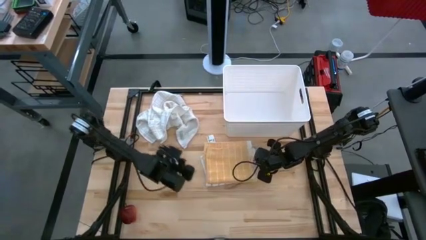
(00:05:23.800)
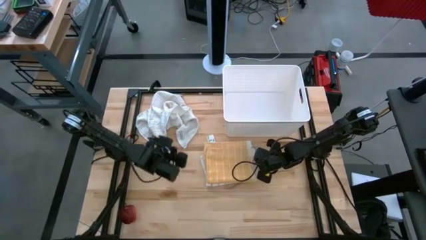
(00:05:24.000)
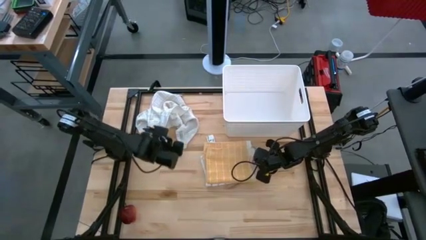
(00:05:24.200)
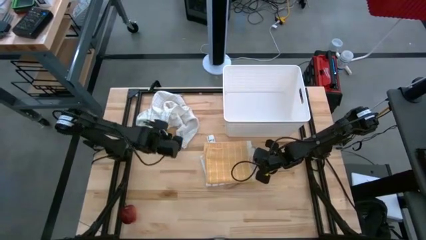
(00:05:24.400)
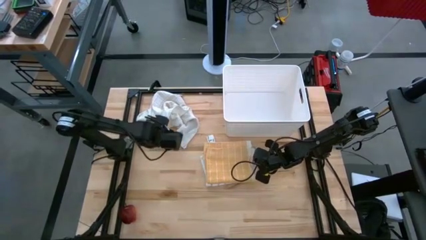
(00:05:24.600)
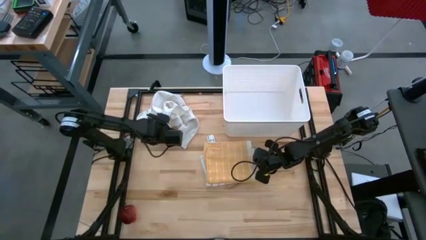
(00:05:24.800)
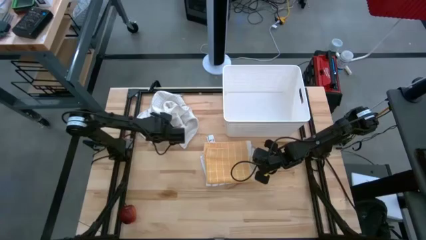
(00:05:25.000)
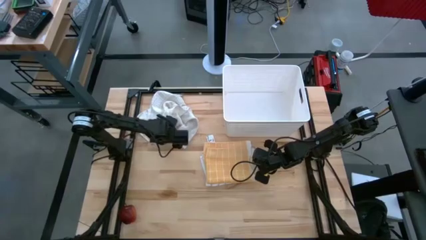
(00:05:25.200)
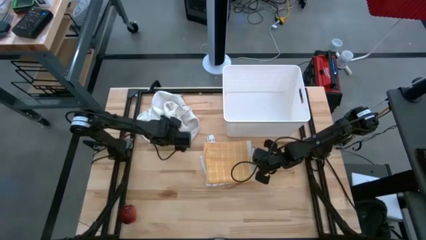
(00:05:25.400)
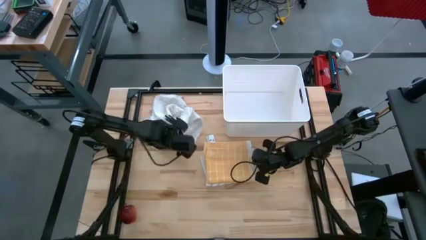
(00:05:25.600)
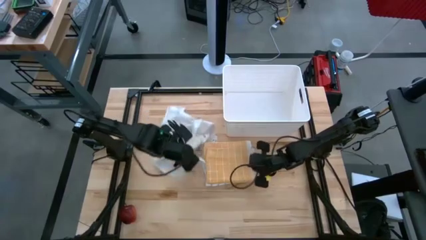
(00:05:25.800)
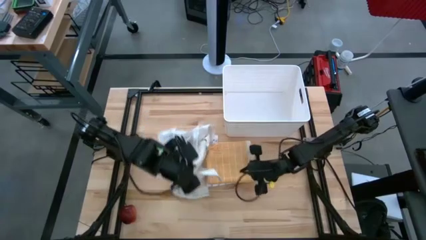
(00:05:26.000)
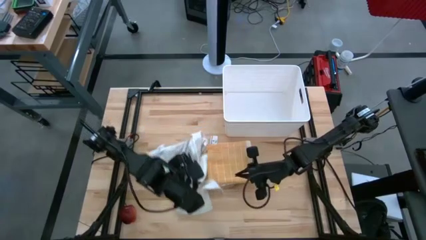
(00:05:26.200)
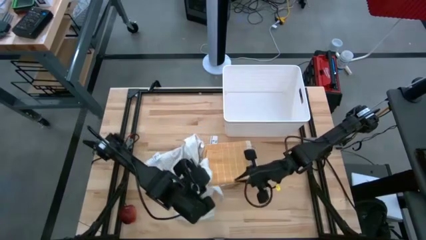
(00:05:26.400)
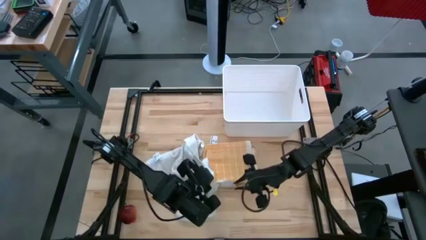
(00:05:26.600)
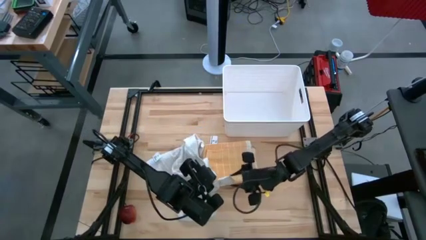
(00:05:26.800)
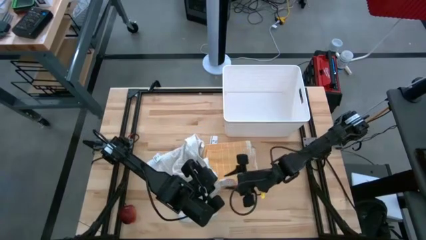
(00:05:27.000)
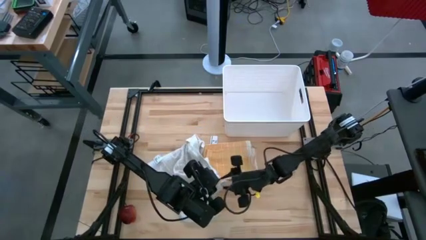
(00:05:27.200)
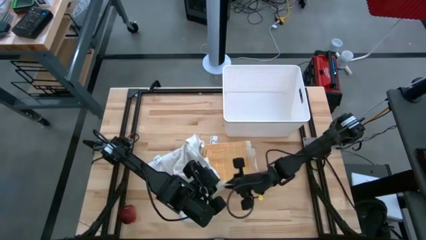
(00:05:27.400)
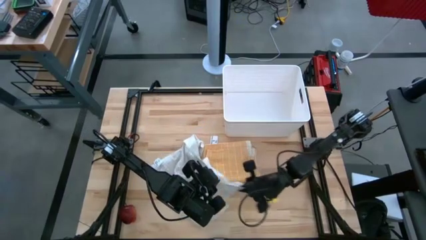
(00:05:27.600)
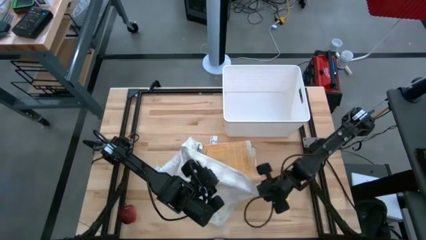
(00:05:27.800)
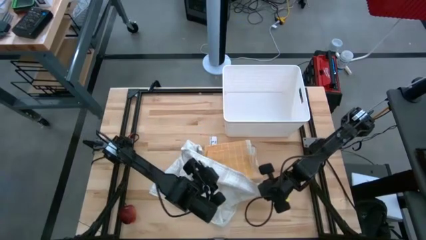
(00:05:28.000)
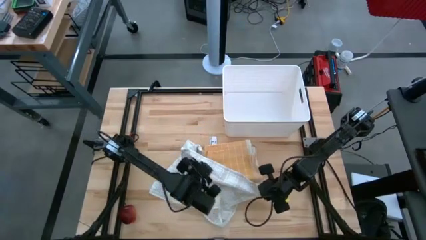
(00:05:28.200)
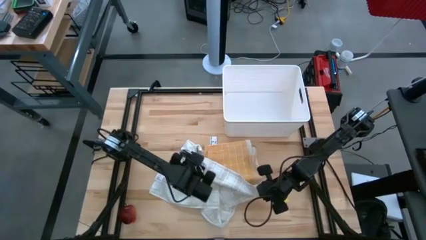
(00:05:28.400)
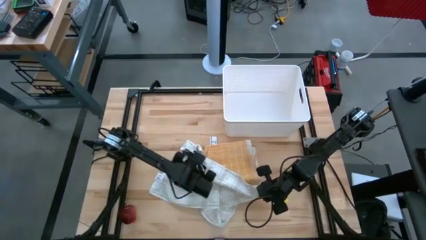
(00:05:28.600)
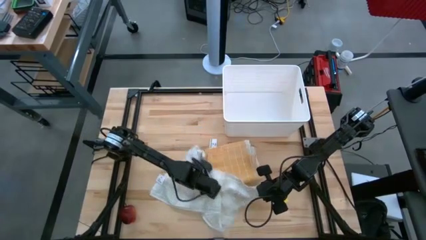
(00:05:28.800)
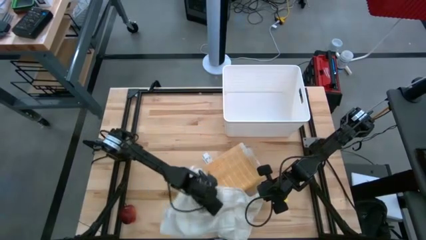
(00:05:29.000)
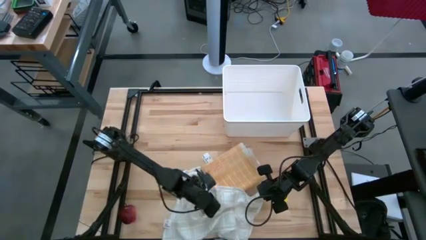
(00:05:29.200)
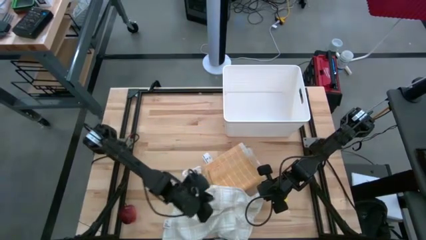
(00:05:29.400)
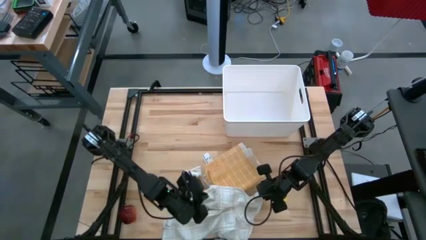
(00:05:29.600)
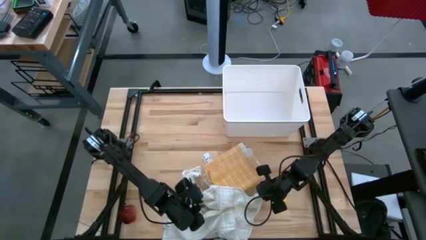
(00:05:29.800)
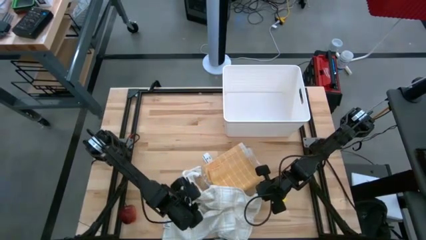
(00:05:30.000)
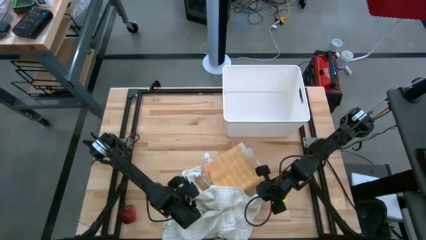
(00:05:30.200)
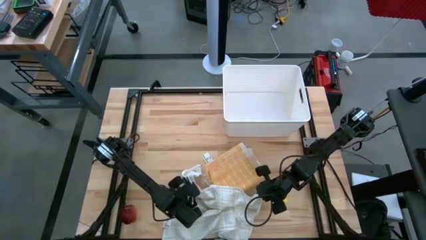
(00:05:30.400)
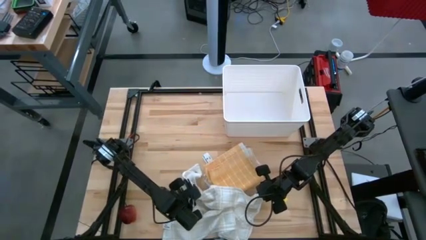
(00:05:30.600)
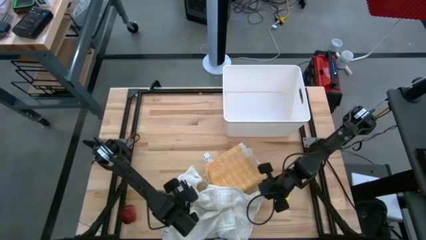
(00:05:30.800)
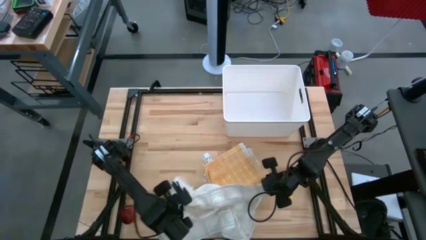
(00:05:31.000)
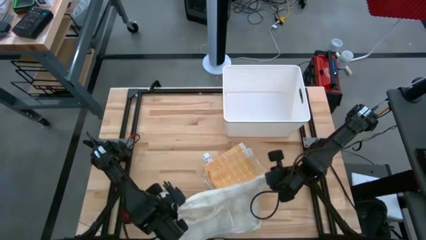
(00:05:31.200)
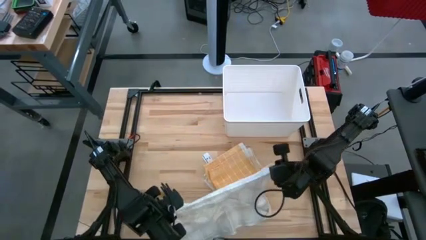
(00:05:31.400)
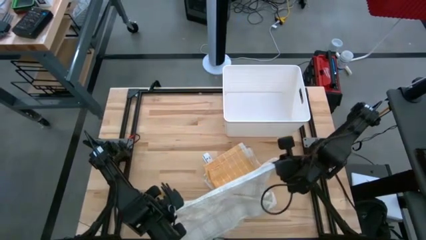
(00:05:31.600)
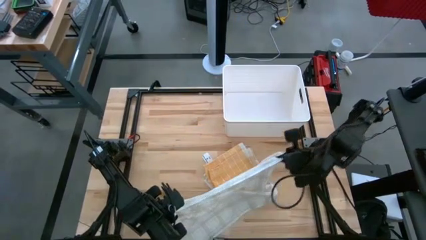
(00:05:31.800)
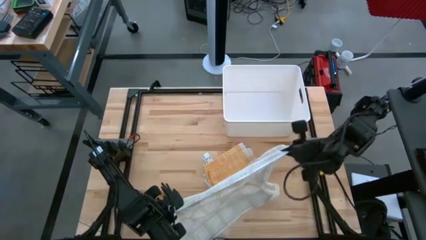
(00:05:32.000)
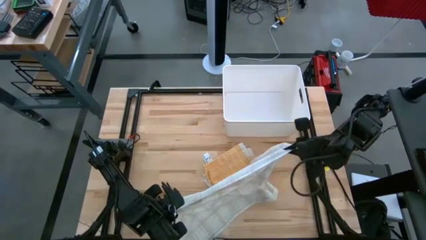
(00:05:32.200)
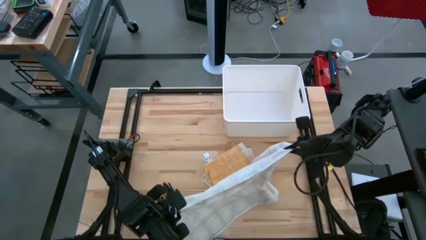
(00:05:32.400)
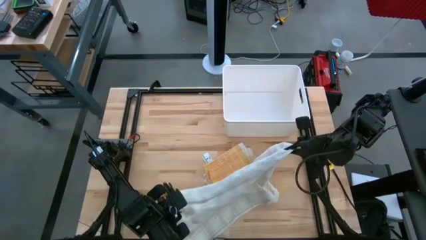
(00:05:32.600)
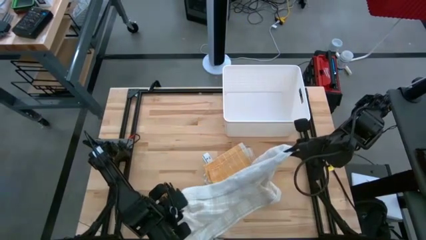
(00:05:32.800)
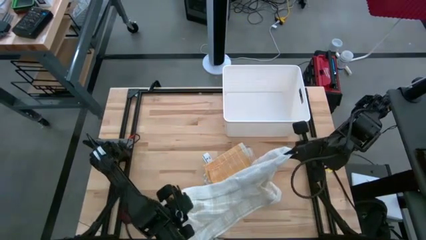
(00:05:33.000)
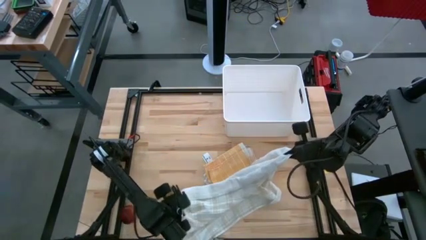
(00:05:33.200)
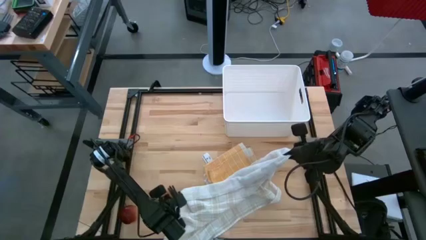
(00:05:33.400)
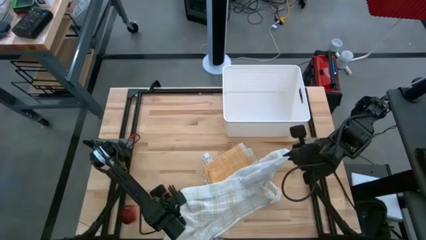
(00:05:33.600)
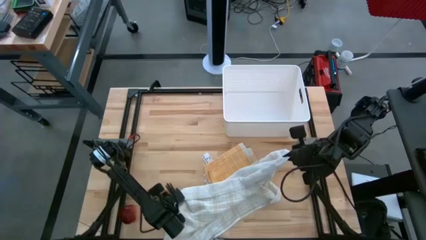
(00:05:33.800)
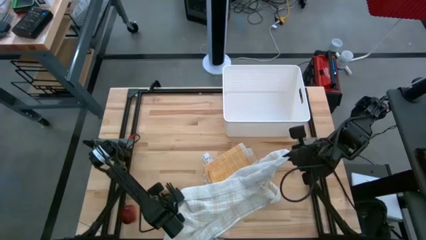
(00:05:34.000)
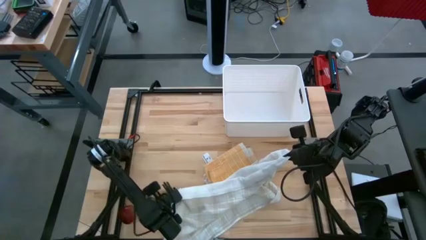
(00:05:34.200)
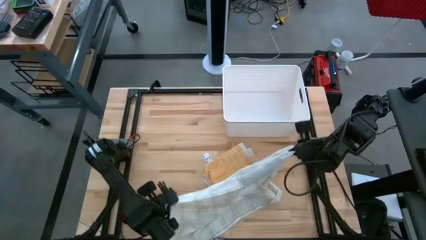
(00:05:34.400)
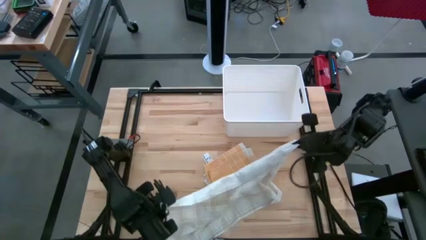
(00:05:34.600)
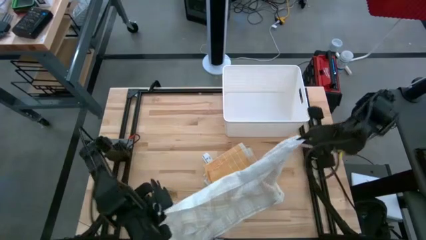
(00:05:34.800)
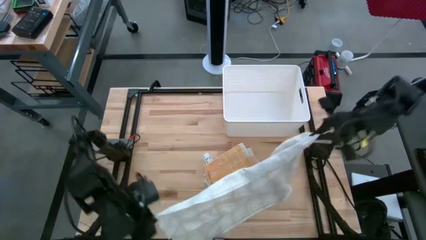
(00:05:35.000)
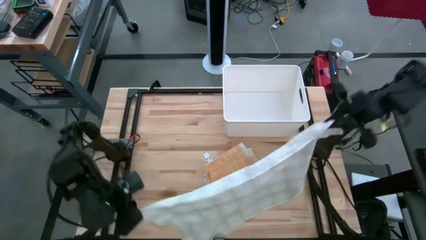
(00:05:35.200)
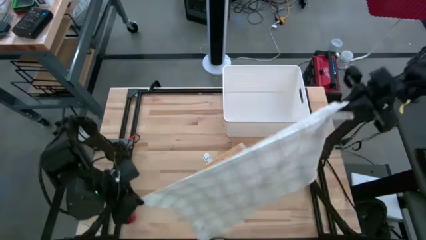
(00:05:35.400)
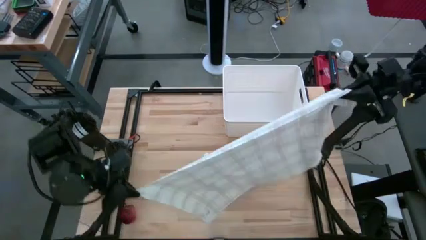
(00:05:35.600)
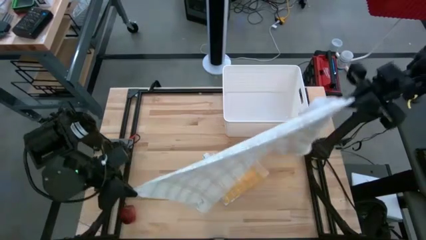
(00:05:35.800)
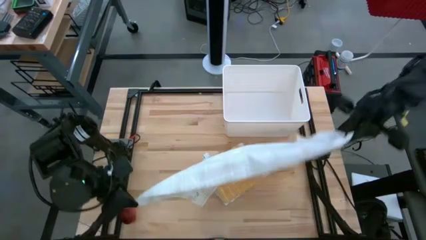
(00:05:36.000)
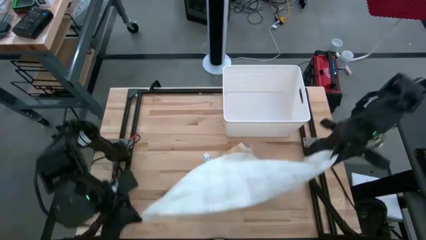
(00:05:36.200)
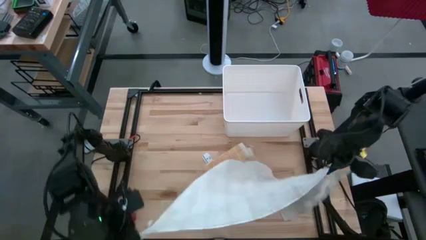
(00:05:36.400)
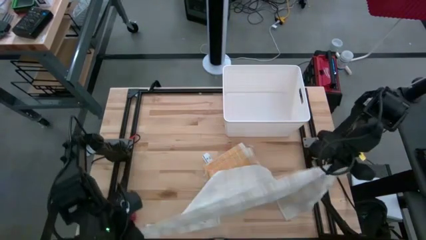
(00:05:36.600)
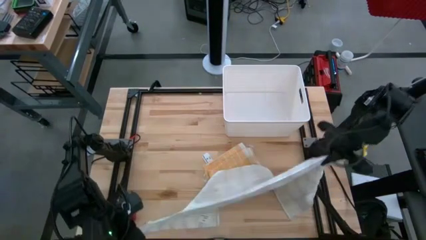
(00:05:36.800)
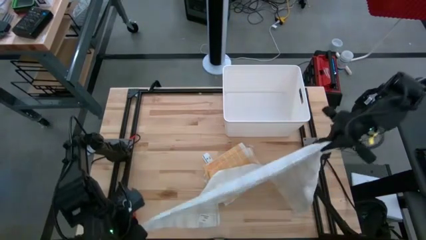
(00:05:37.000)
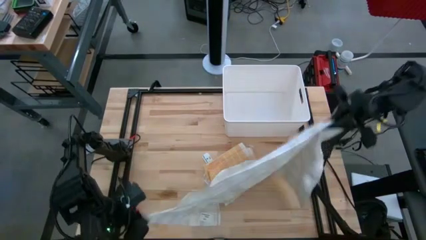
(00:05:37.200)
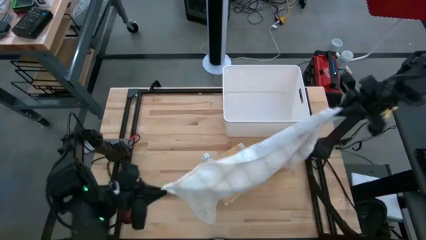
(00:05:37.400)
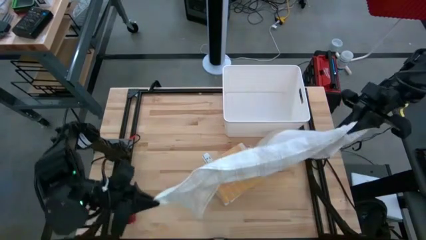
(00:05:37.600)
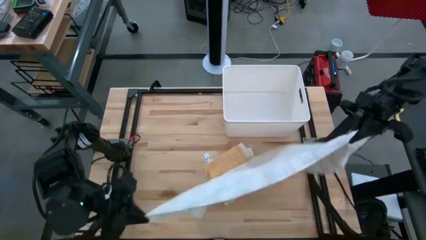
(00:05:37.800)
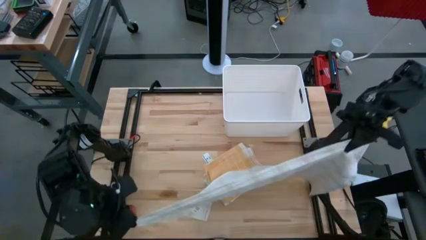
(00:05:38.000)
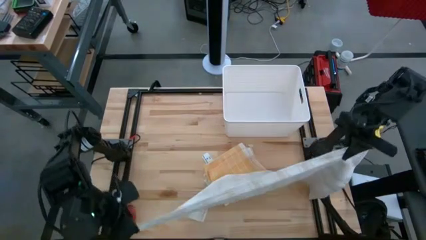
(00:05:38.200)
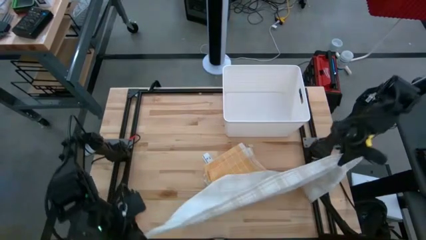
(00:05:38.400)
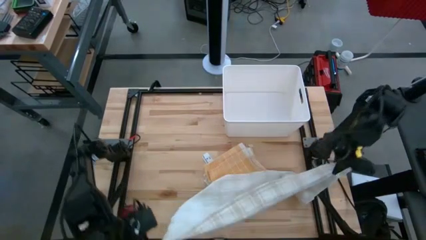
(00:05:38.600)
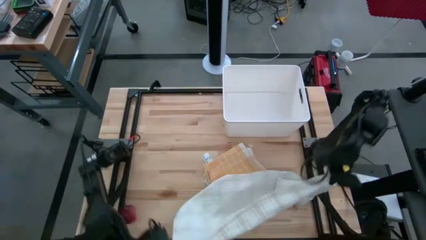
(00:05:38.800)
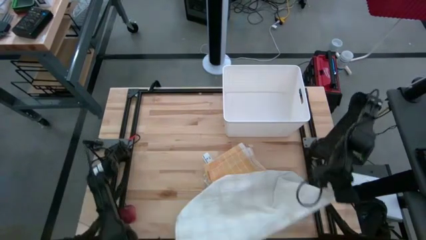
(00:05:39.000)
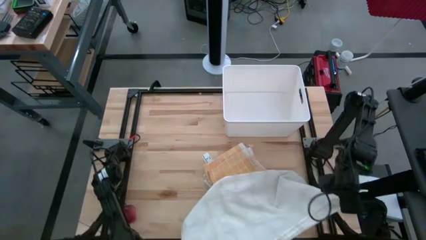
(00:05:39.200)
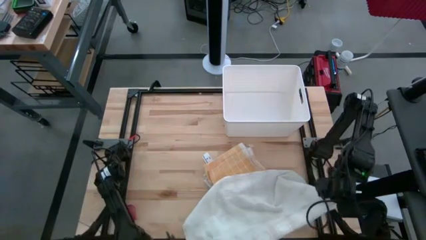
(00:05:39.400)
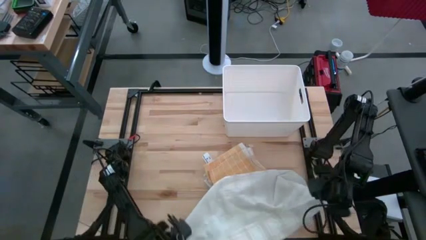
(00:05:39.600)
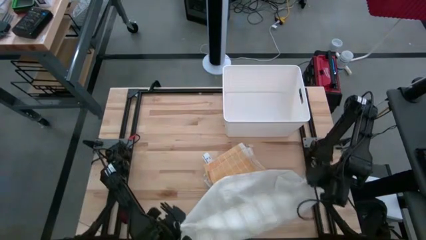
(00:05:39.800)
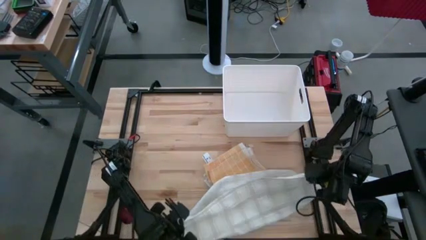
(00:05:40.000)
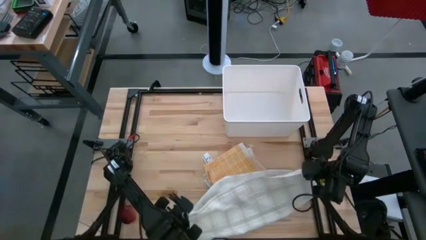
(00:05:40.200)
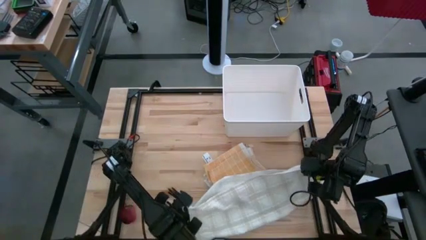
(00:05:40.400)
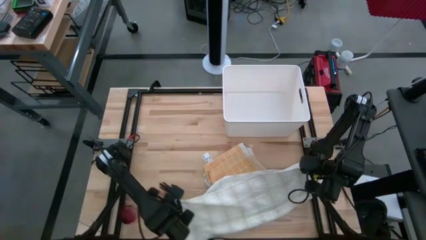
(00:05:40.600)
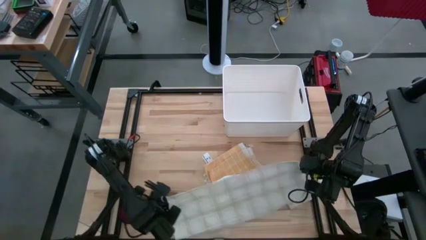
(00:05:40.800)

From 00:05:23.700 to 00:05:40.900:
Task: Fold towel
Fold the white checkered towel
